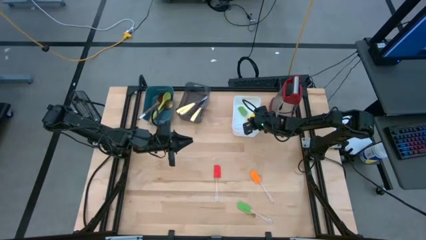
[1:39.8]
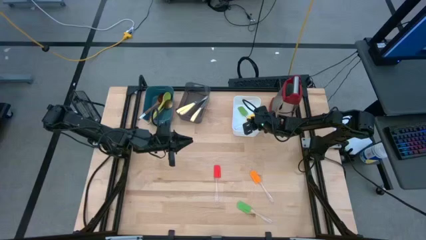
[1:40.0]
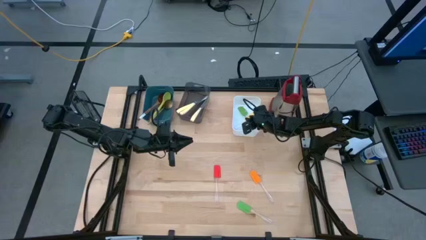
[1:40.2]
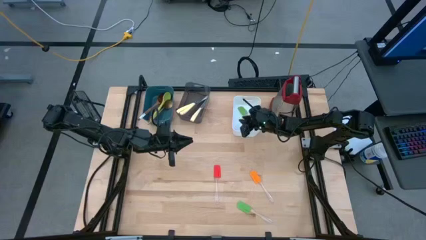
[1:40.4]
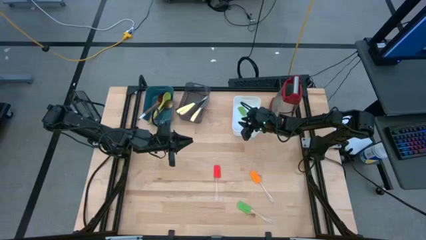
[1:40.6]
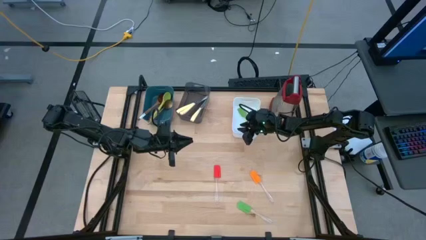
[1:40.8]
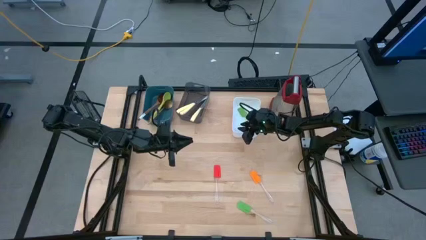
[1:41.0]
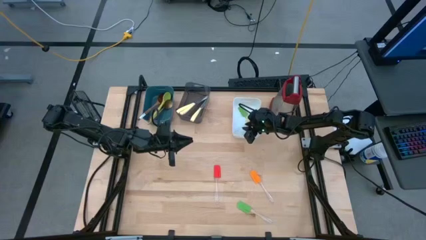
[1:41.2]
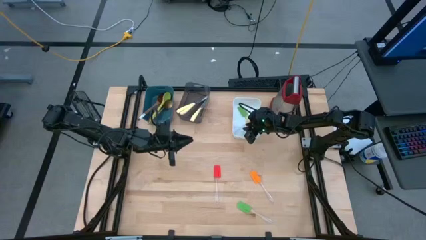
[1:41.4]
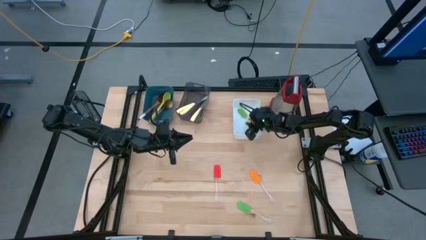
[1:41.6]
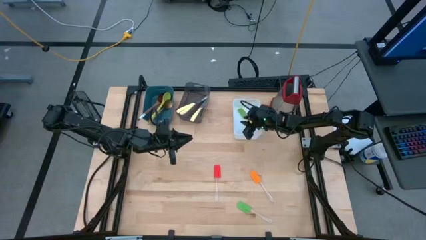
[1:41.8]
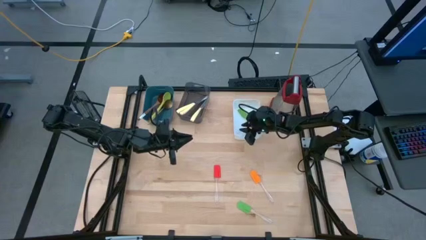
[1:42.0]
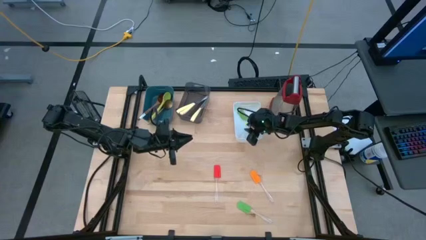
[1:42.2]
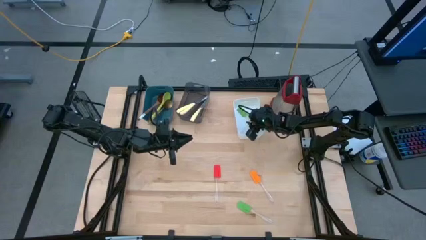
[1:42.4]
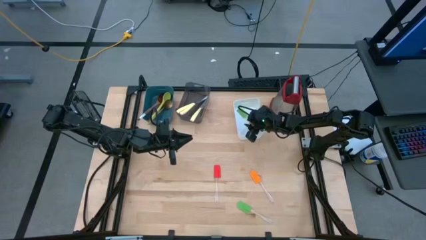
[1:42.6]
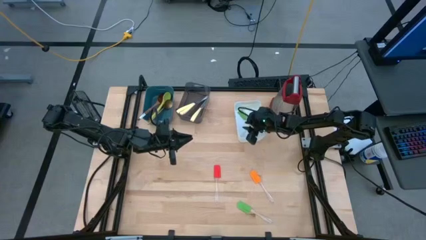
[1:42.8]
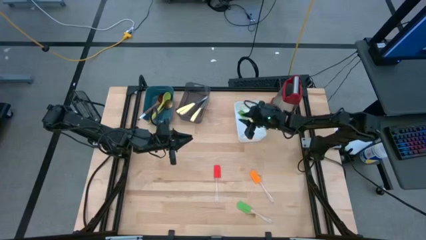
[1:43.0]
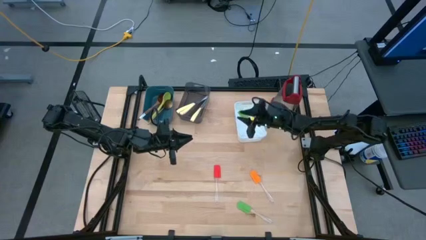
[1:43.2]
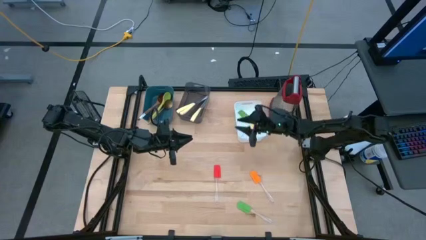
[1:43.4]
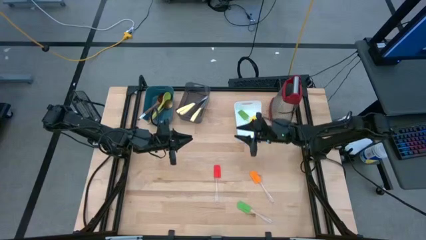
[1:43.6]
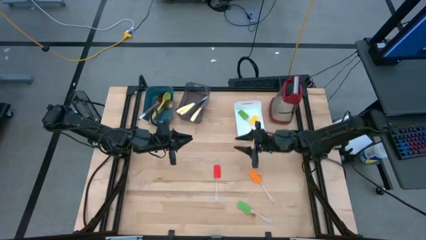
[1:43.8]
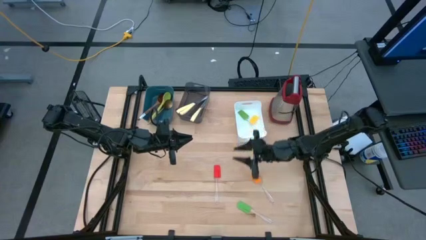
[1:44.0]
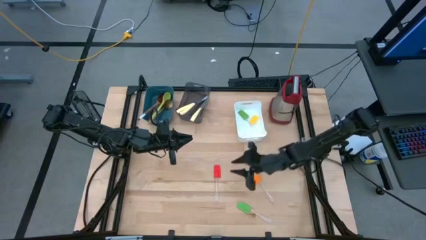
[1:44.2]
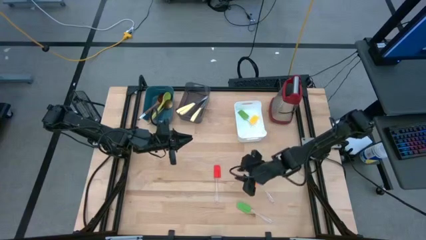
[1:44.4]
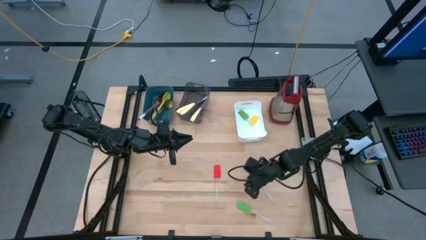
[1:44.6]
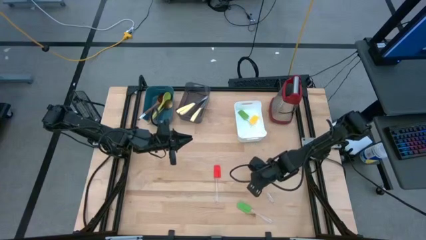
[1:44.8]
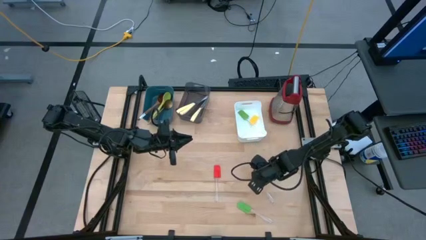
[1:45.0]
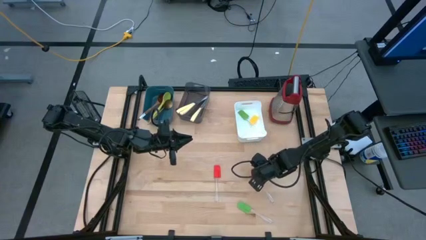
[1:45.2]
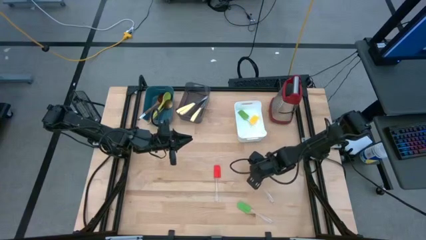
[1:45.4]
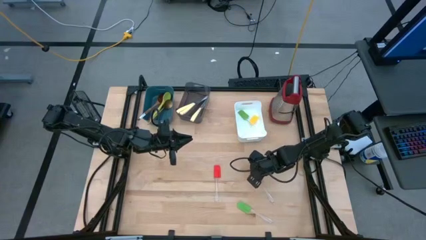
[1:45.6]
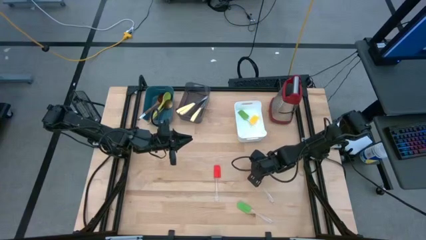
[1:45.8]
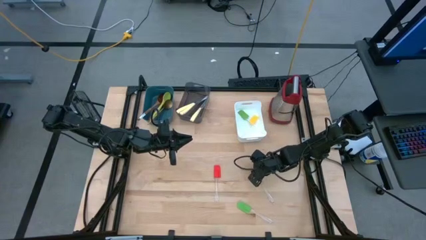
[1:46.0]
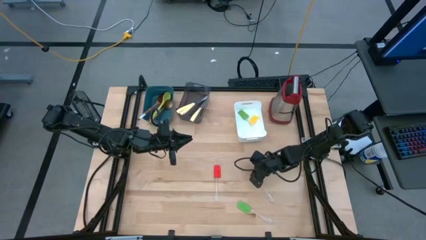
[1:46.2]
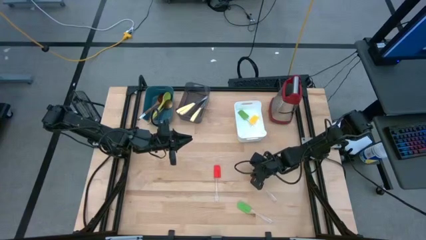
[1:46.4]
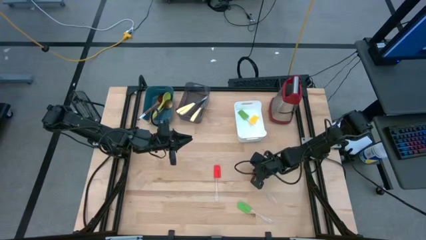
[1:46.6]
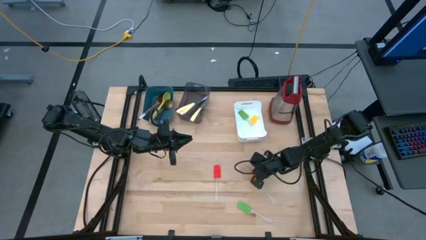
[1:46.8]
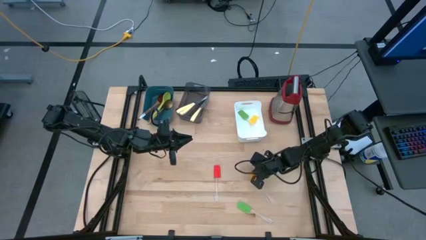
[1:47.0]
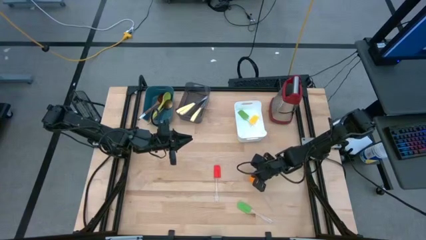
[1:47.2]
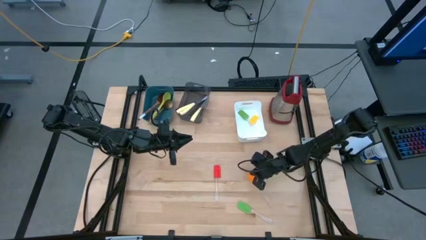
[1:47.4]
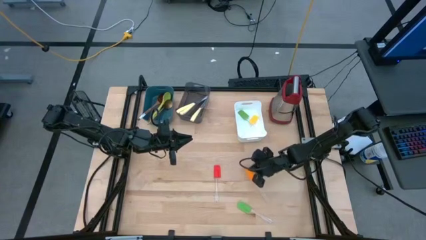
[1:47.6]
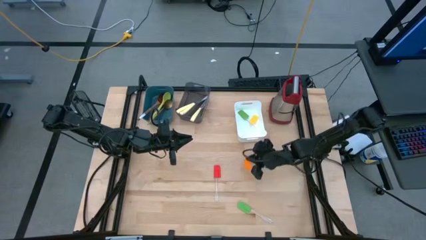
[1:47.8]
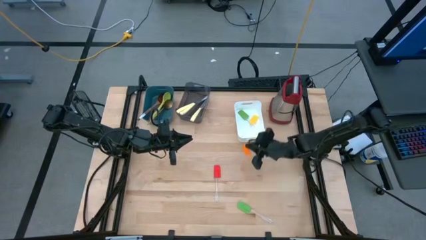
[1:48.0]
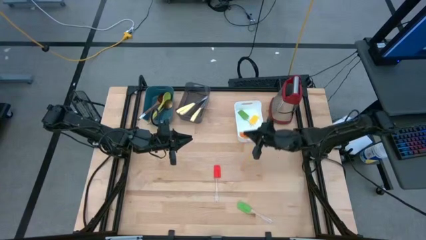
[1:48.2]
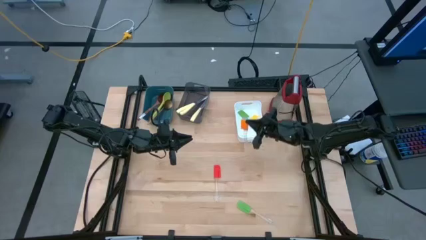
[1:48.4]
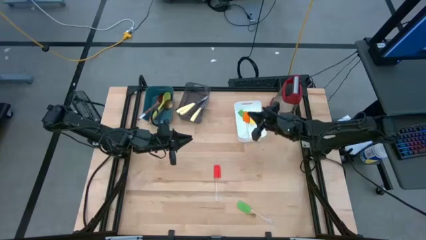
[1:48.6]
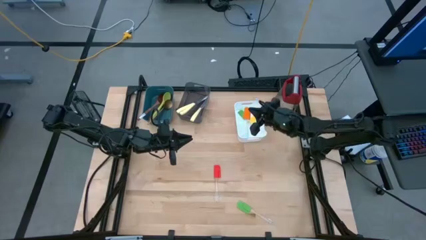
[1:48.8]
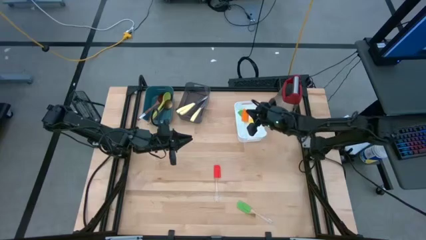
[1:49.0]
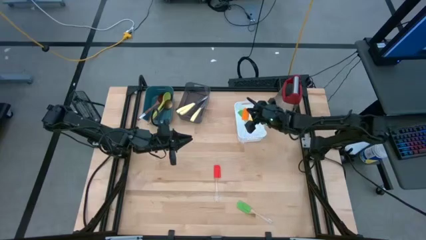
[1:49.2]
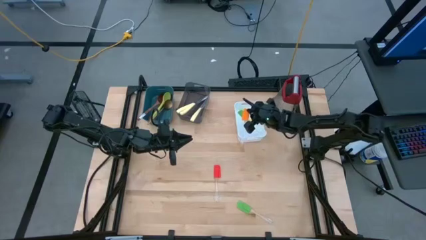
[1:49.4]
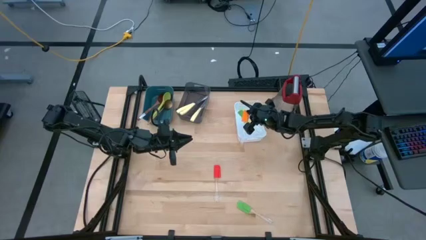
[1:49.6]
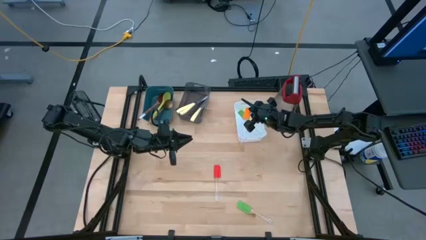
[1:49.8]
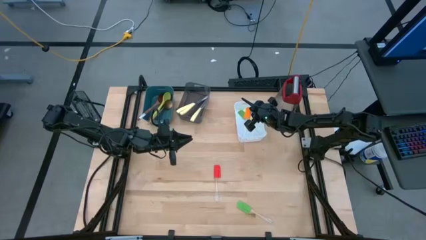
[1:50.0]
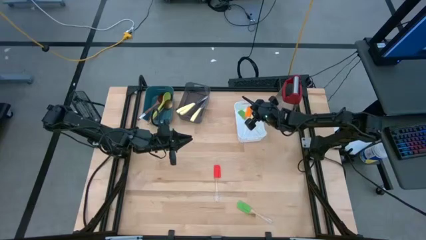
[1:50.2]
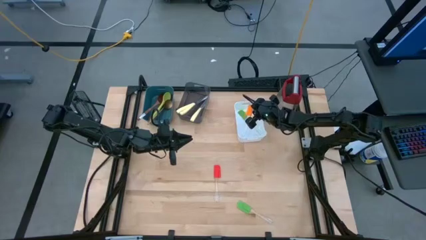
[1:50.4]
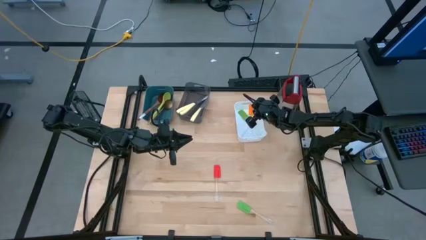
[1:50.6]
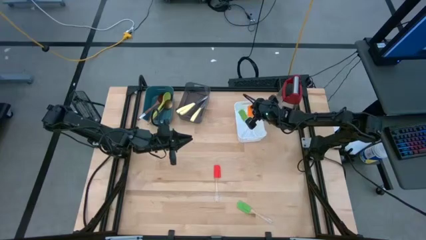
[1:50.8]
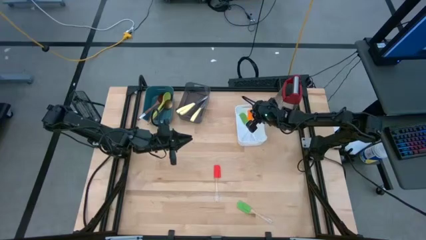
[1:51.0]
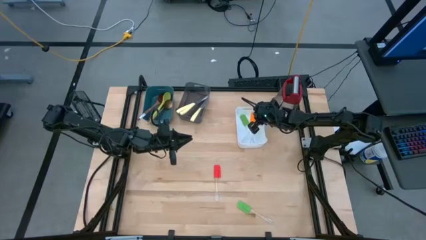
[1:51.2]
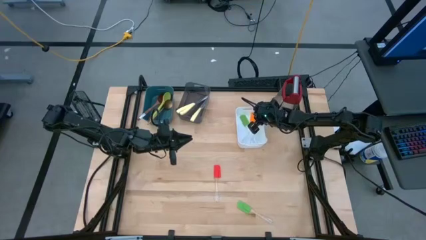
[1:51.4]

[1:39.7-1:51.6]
Task: Pick & Place Kitchen Items
Put the orange spatula into the white bin

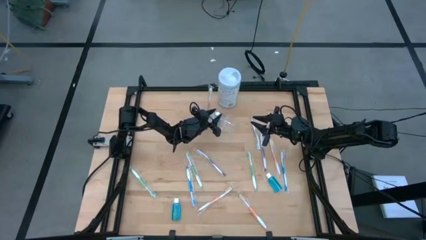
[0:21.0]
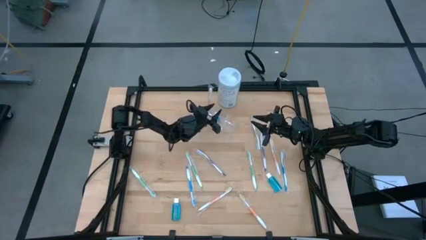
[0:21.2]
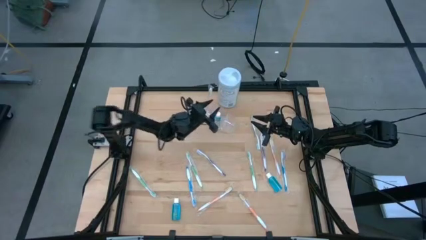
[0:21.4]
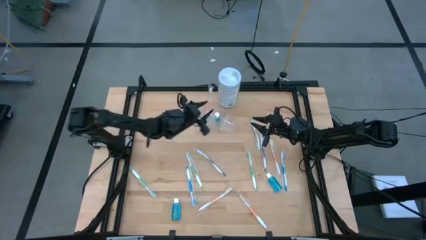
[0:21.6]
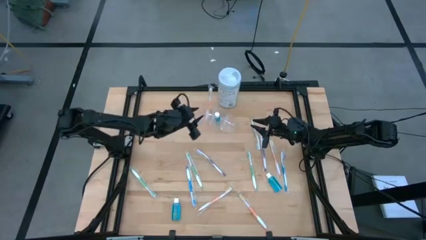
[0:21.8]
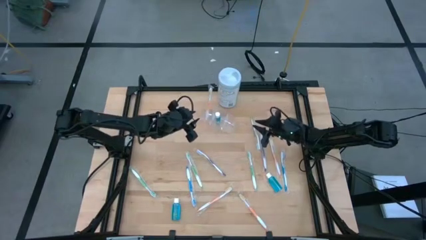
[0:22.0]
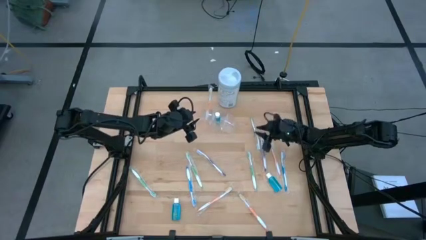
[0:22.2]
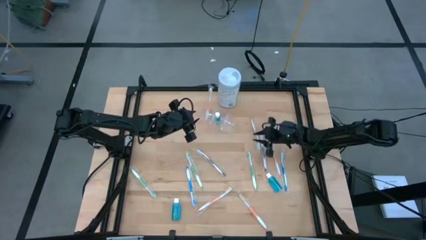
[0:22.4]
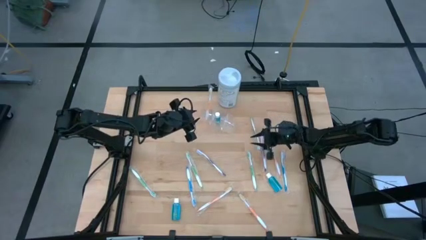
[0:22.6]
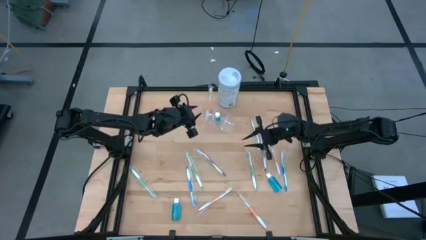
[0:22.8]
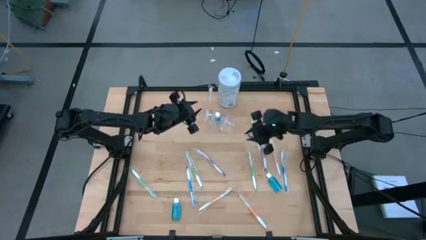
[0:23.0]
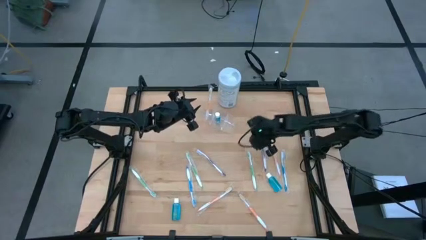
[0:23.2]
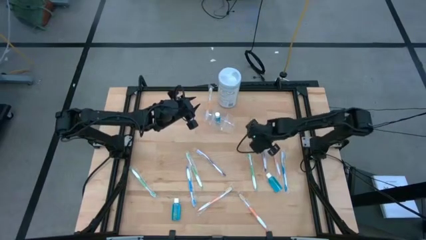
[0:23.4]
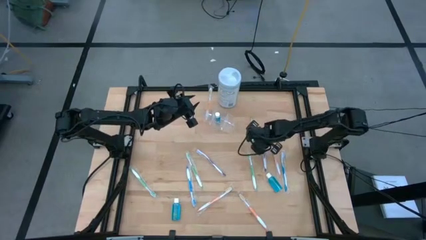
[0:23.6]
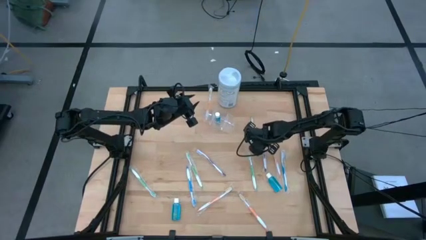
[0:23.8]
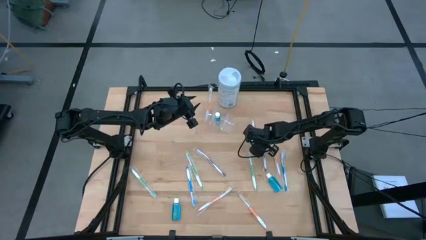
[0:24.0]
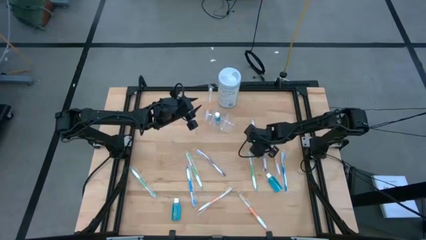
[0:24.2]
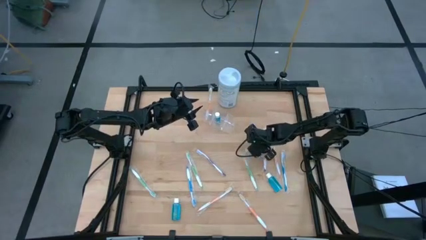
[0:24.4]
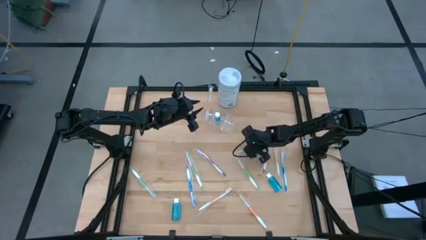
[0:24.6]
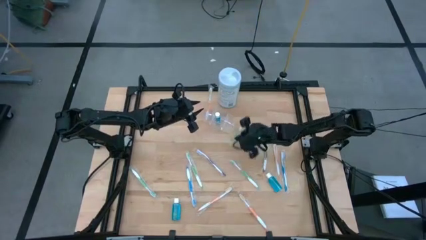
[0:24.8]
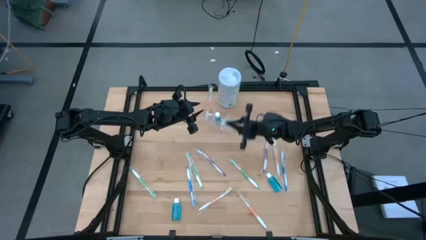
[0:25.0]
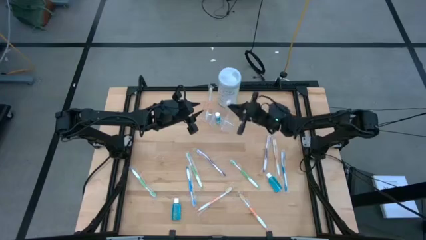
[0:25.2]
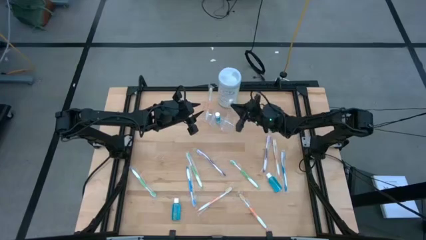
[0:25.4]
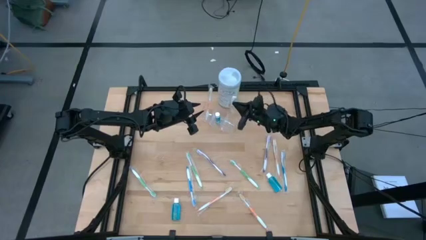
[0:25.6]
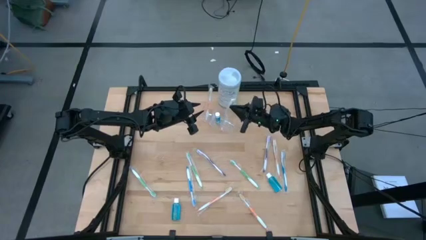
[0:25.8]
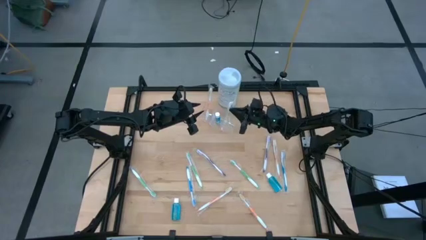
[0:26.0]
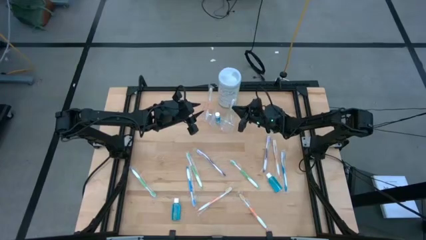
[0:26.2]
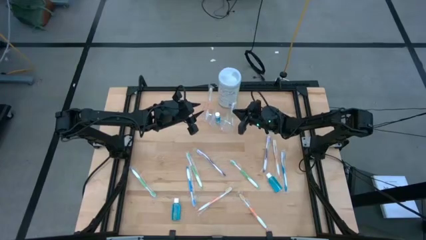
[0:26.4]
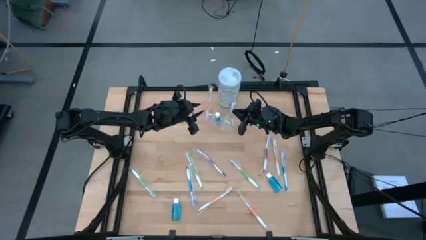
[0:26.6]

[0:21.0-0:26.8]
Task: Pick & Place toothbrushing station
Put the green toothbrush into the transparent organizer
